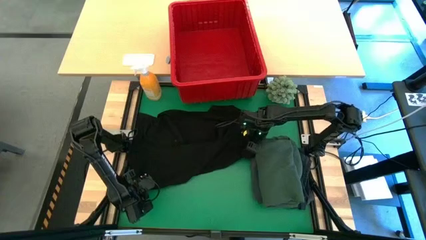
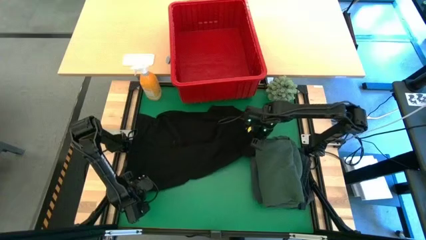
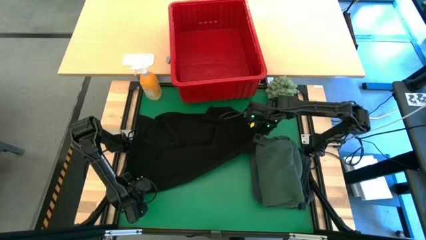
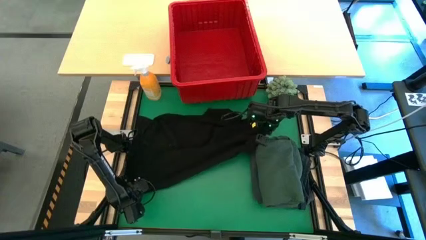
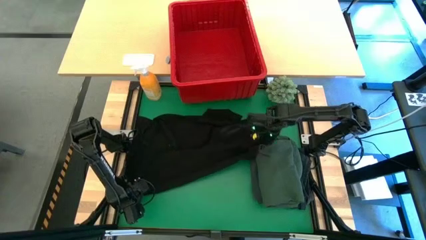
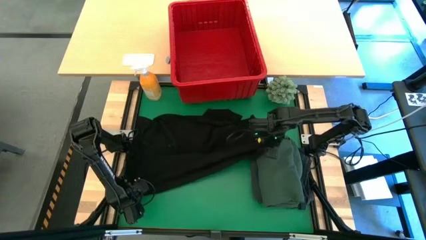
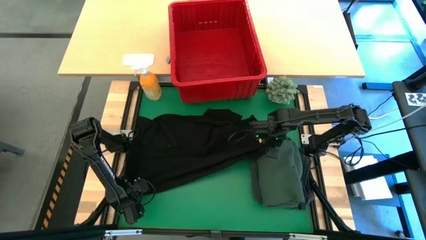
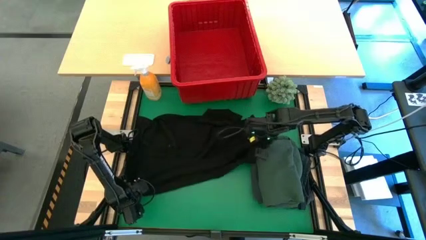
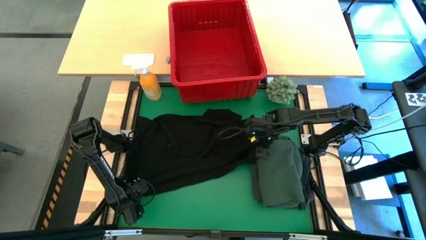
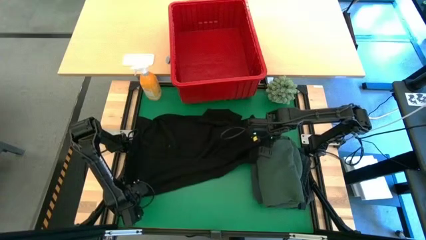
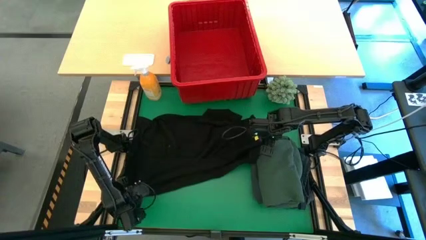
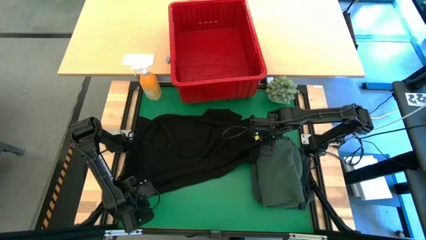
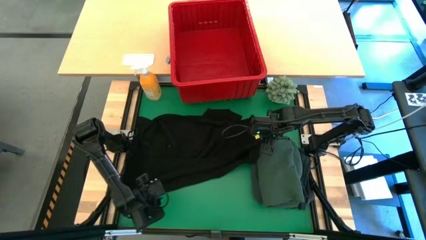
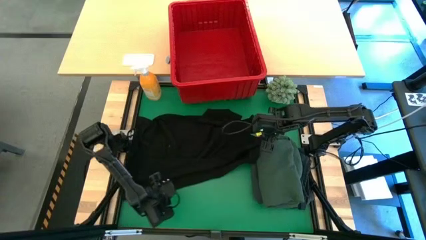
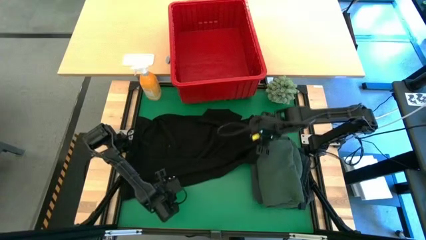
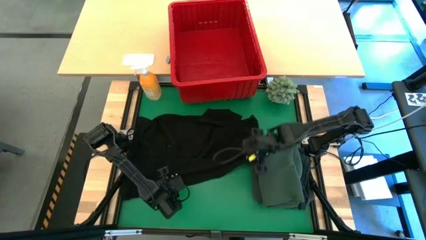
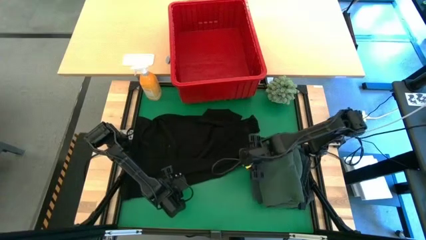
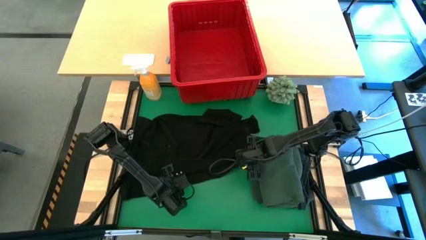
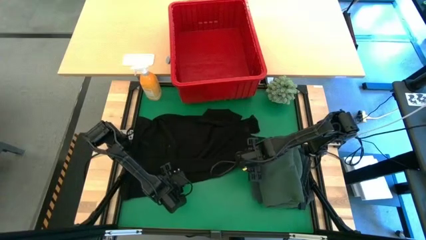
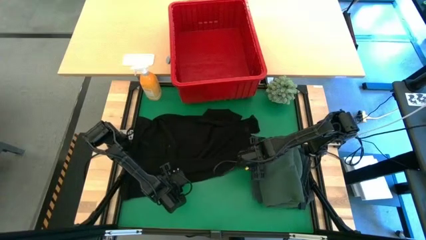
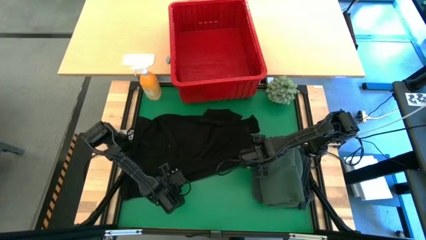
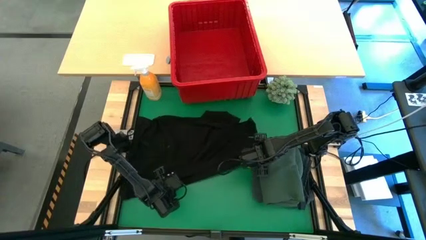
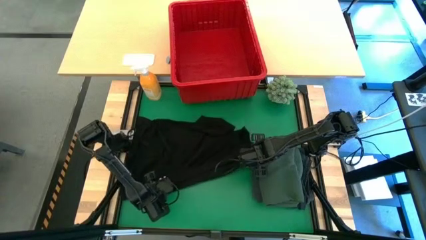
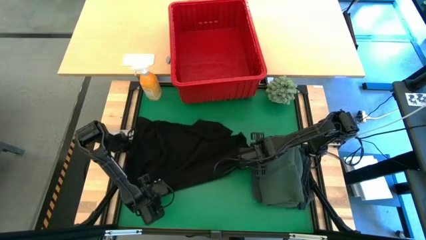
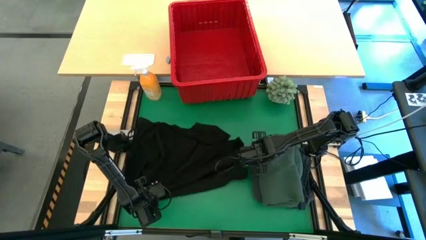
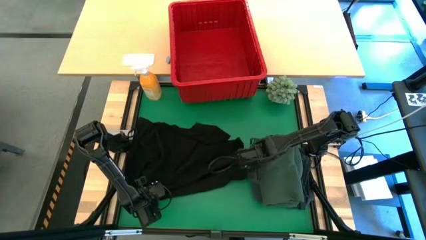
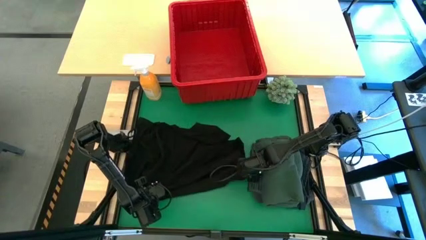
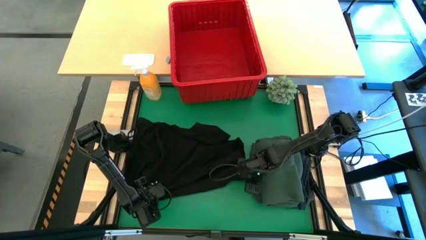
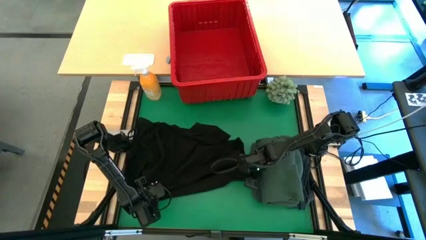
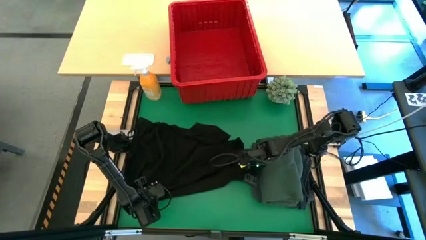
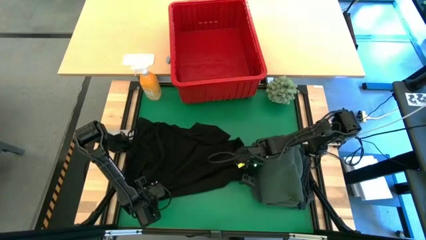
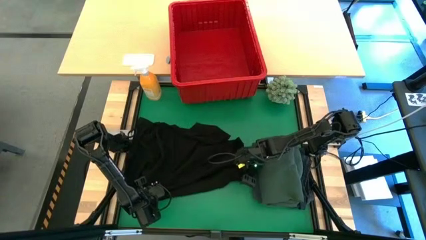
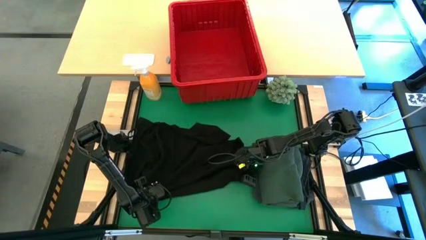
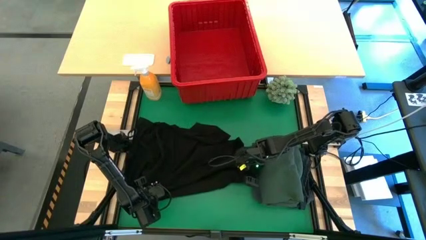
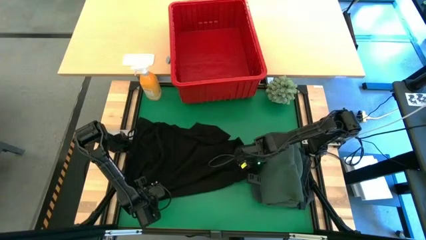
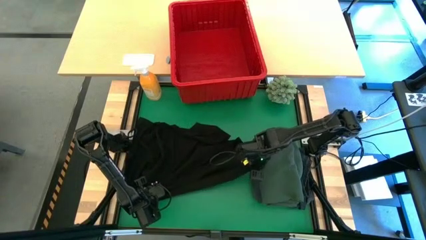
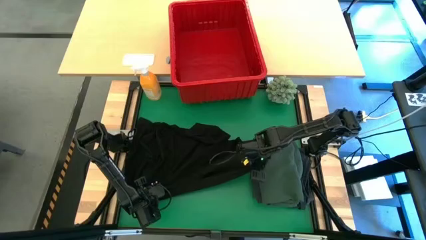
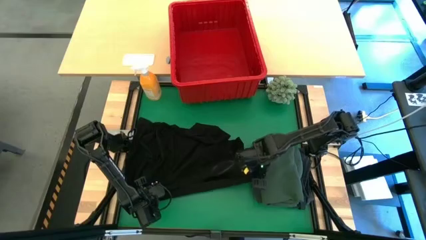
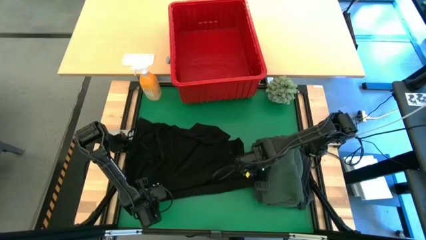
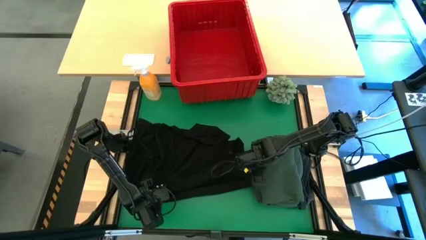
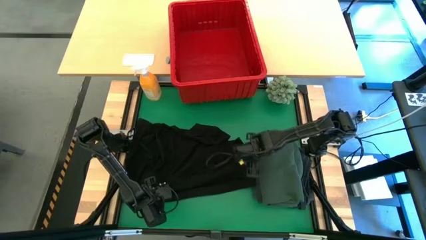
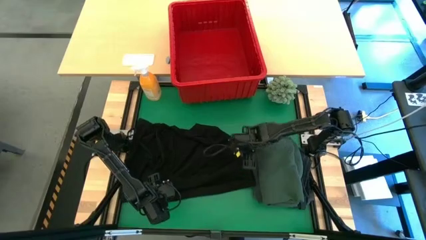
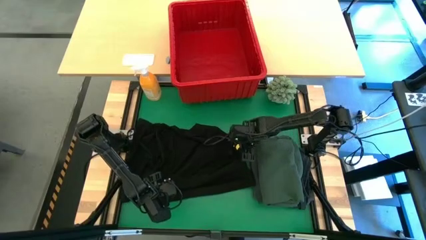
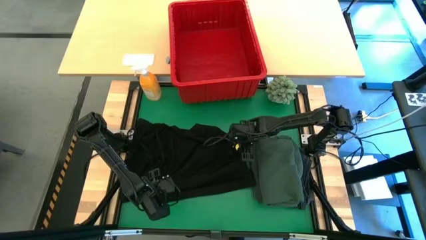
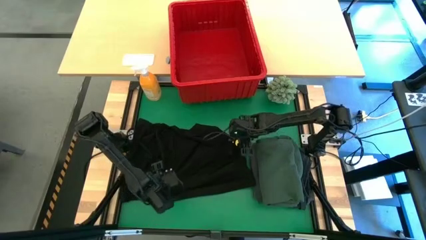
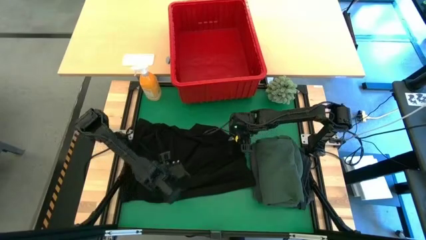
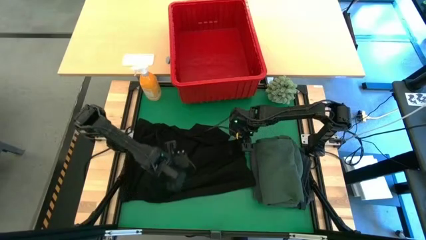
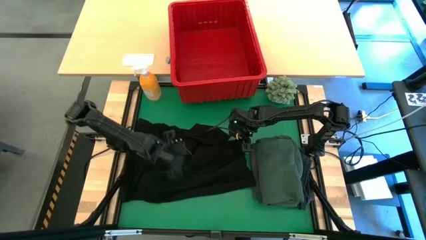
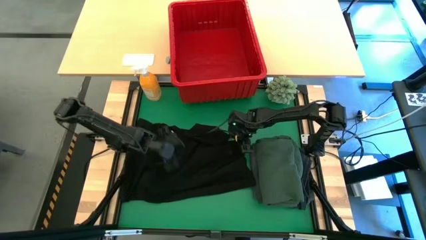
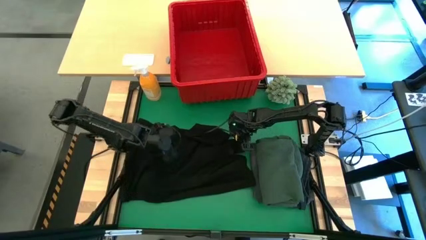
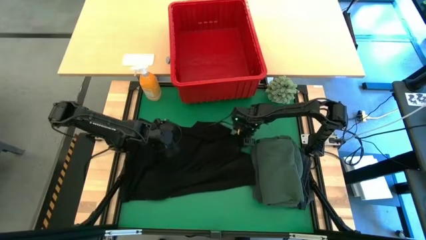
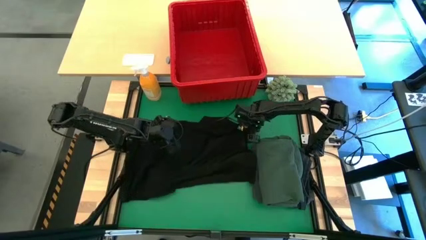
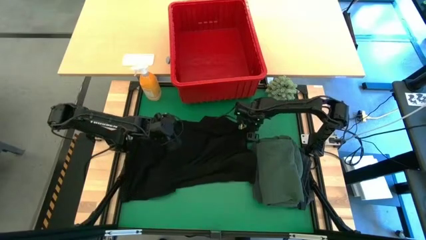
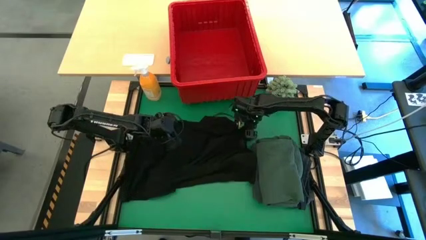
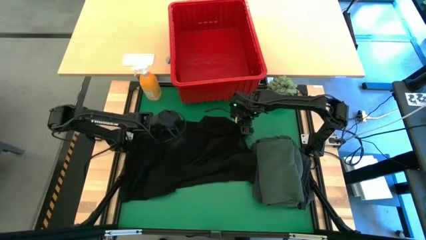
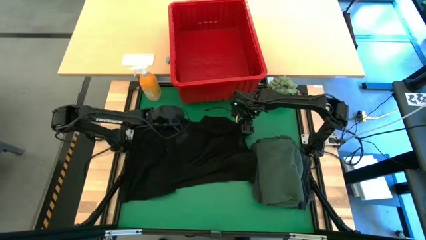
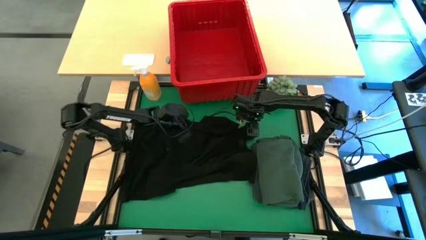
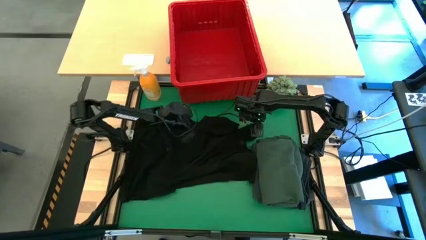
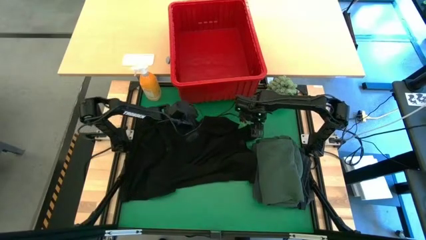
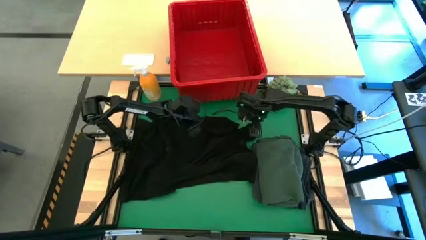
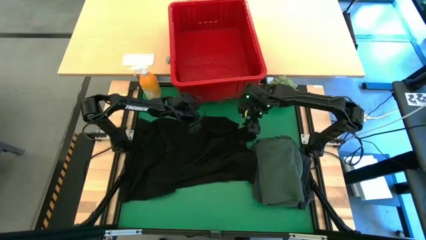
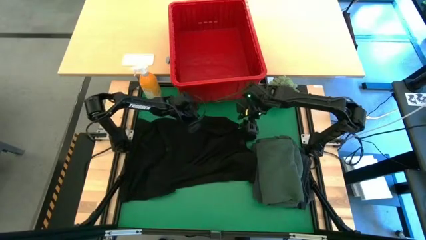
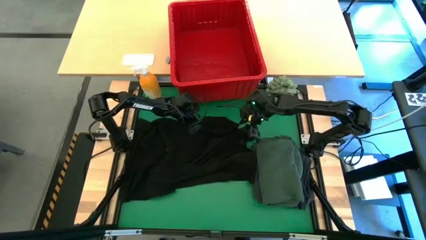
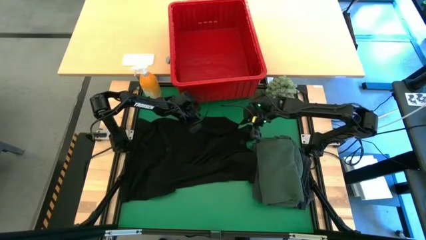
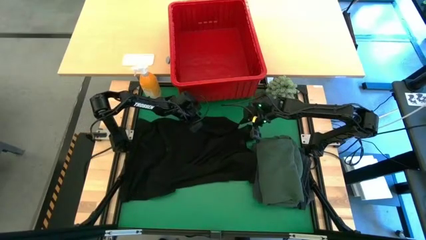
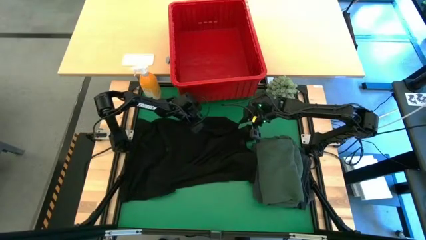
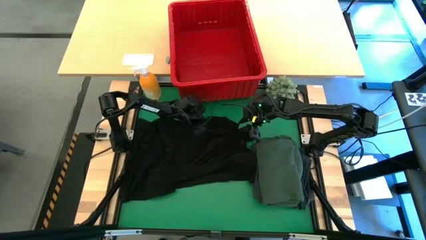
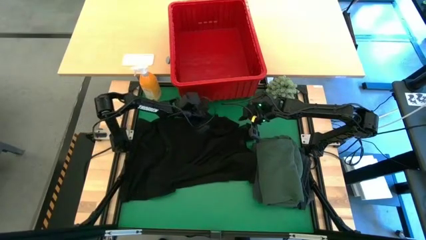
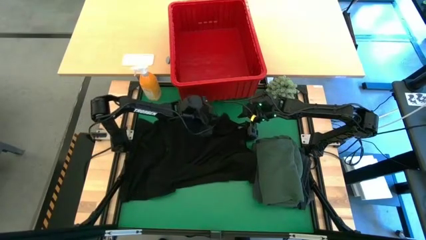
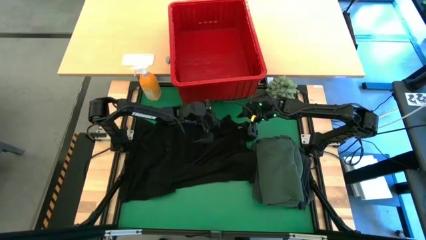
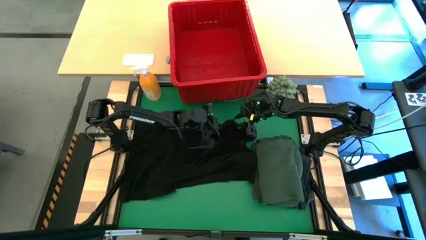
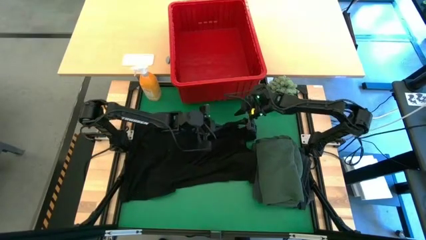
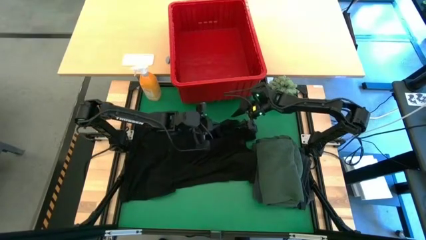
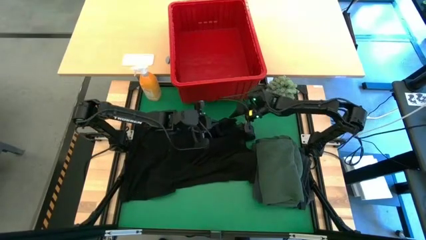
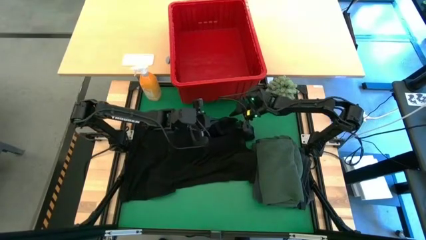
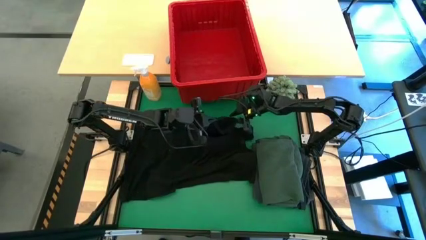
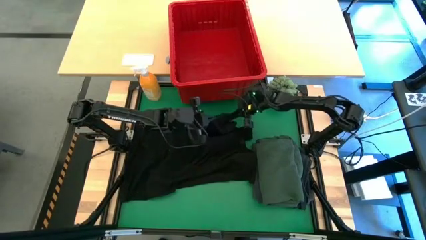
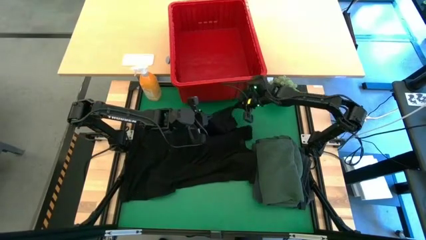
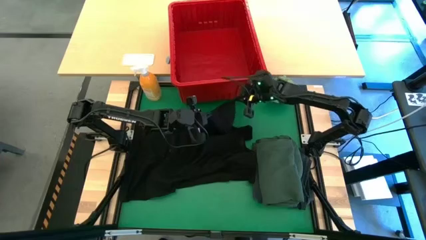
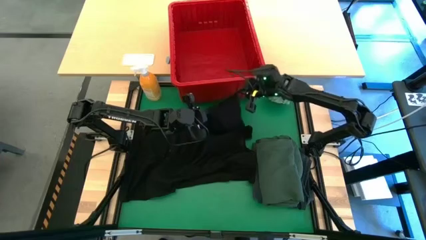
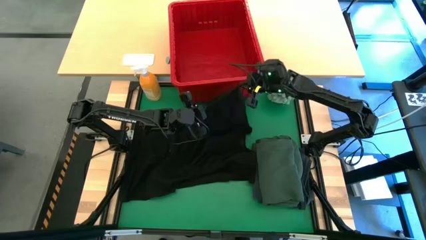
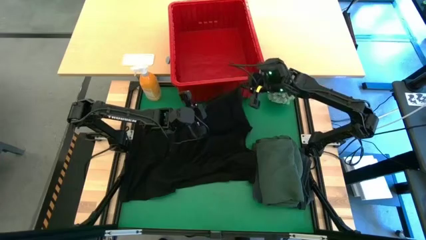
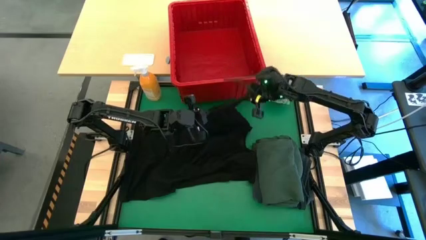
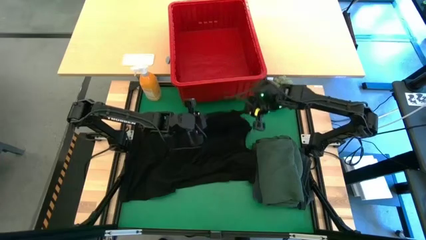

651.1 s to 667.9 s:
Task: Fold Laundry from Bin
Fold the black shirt
